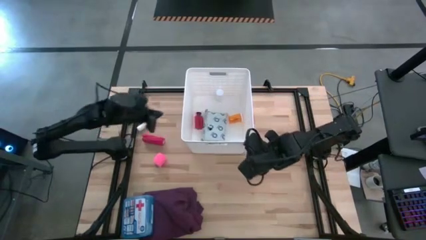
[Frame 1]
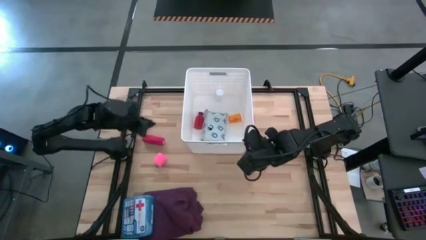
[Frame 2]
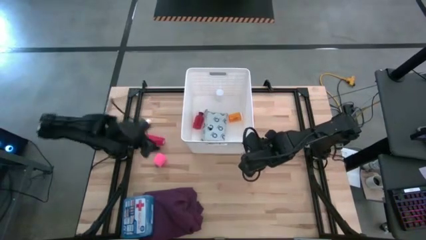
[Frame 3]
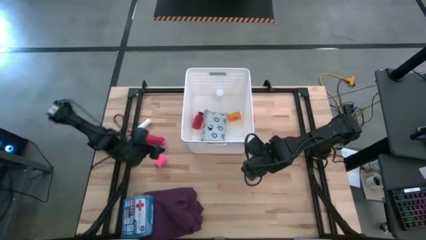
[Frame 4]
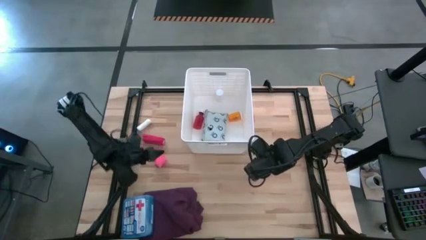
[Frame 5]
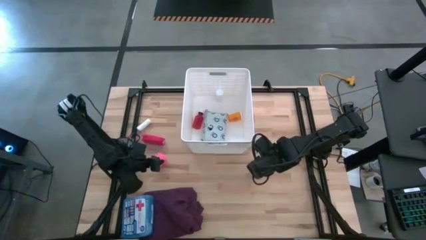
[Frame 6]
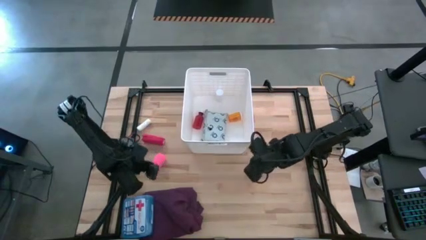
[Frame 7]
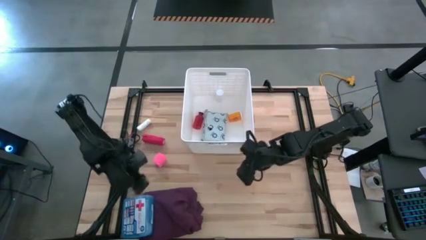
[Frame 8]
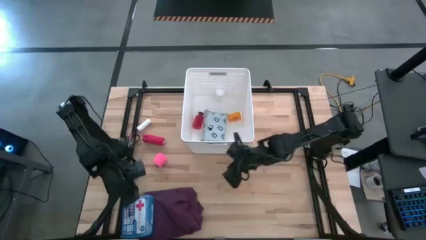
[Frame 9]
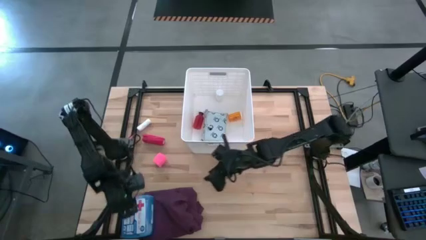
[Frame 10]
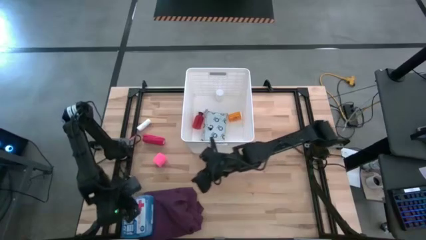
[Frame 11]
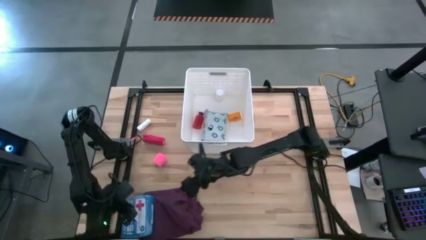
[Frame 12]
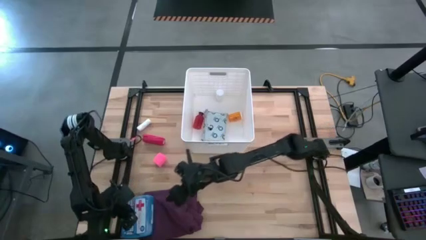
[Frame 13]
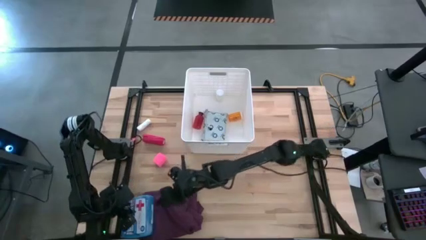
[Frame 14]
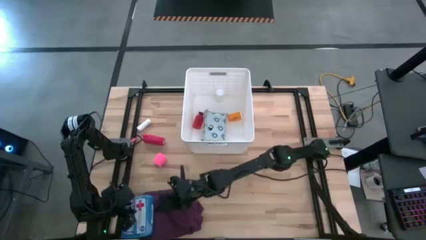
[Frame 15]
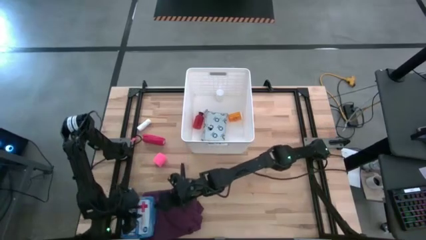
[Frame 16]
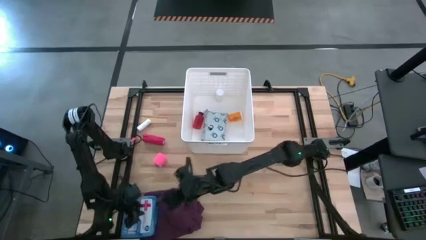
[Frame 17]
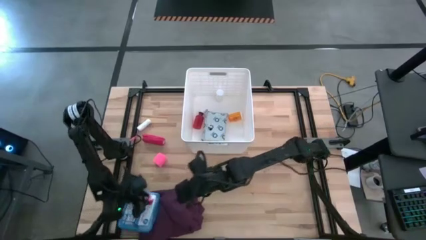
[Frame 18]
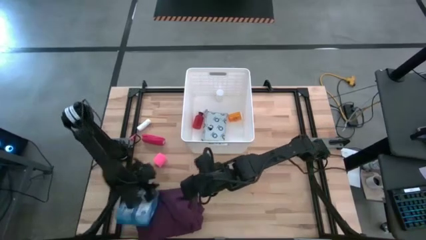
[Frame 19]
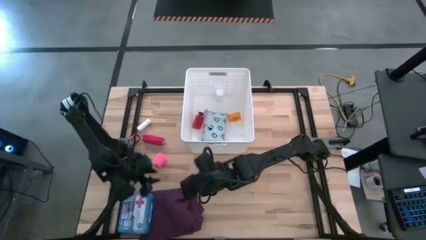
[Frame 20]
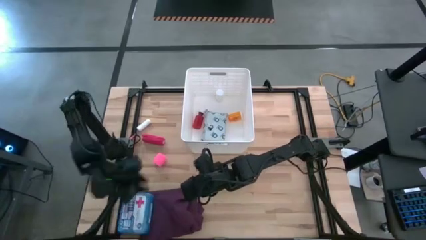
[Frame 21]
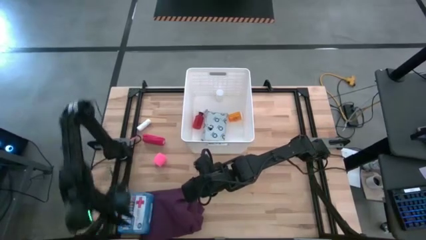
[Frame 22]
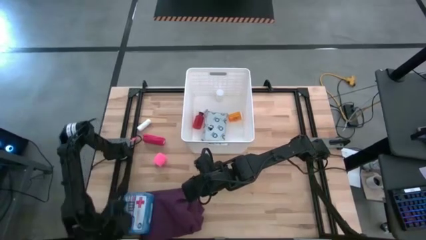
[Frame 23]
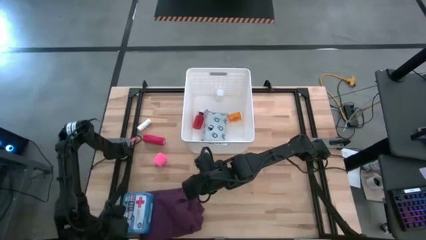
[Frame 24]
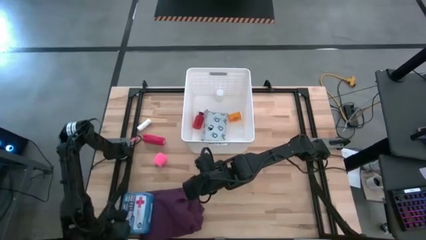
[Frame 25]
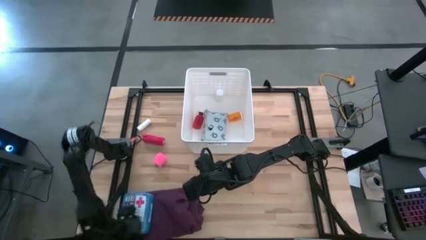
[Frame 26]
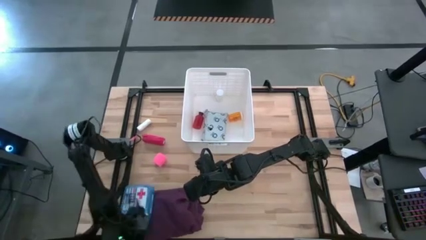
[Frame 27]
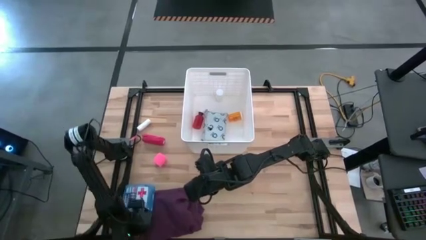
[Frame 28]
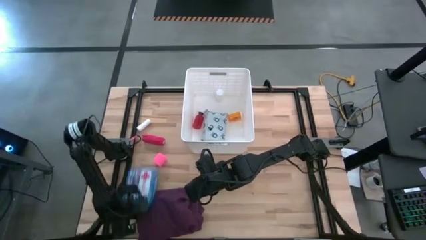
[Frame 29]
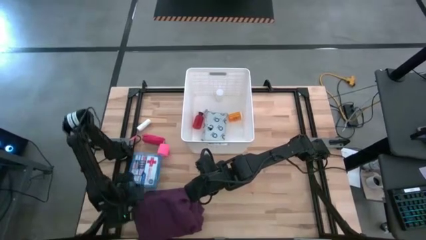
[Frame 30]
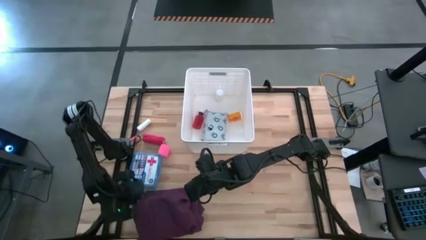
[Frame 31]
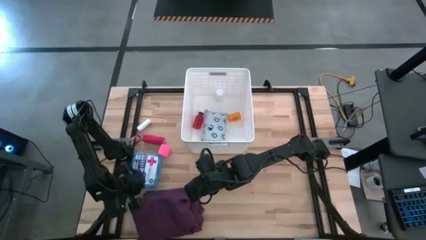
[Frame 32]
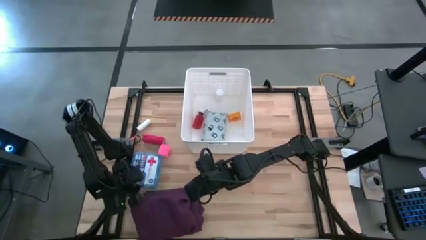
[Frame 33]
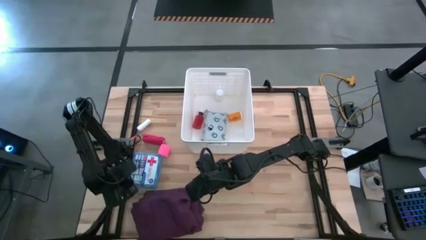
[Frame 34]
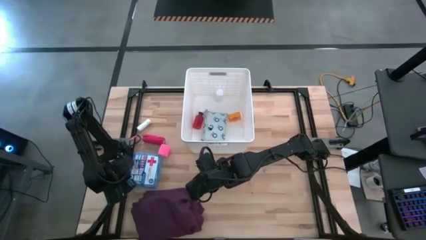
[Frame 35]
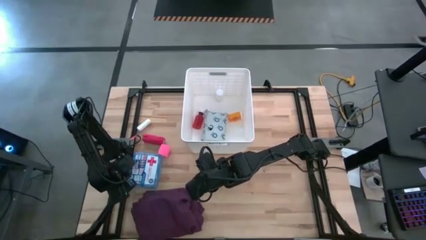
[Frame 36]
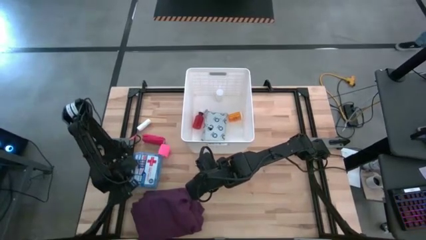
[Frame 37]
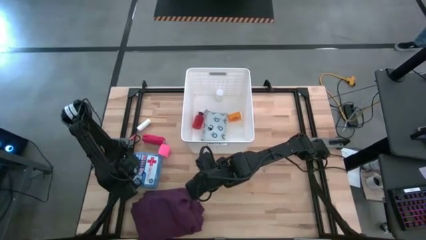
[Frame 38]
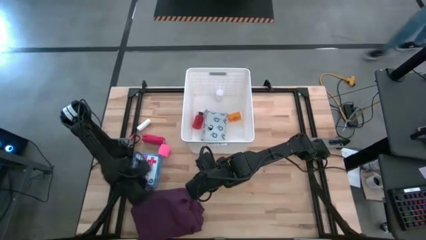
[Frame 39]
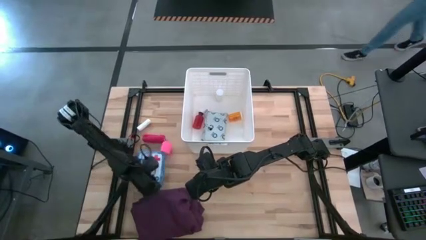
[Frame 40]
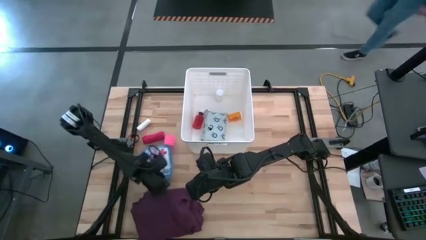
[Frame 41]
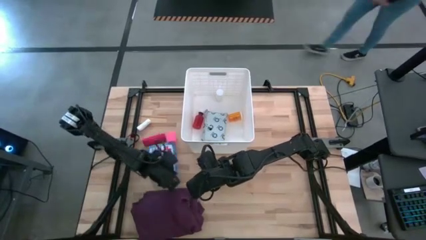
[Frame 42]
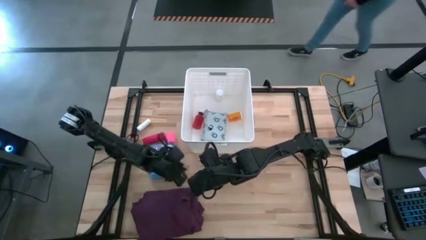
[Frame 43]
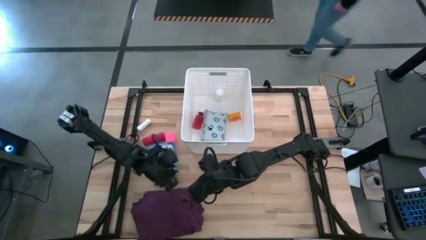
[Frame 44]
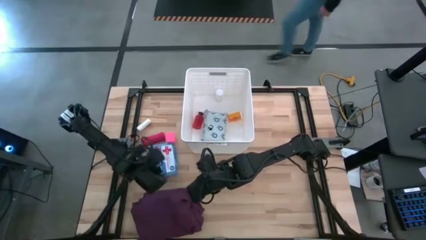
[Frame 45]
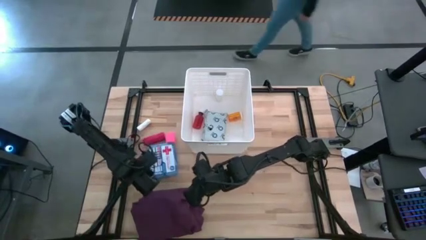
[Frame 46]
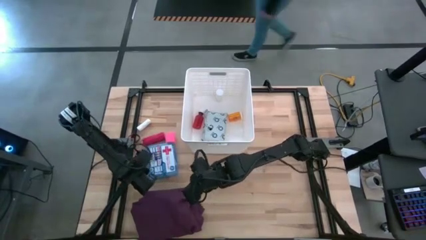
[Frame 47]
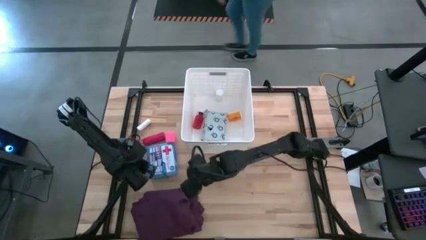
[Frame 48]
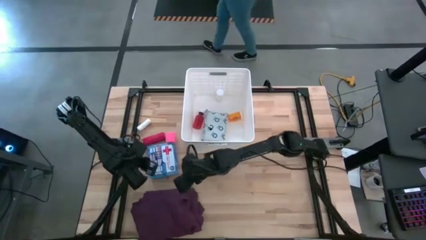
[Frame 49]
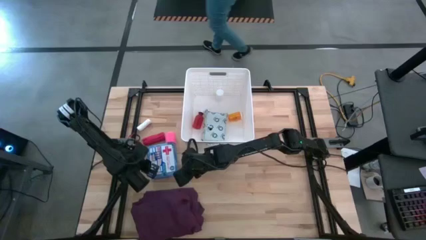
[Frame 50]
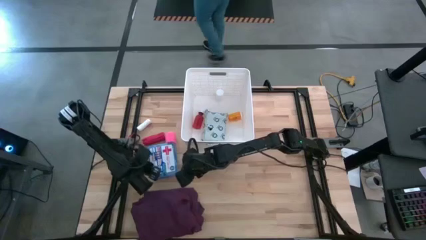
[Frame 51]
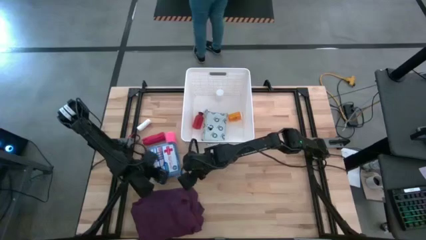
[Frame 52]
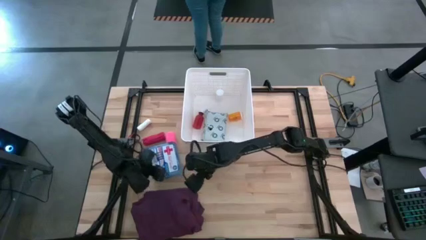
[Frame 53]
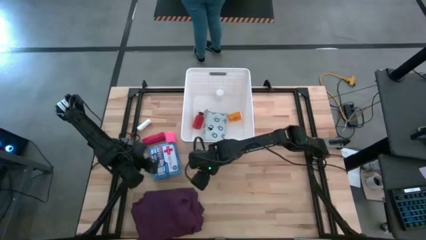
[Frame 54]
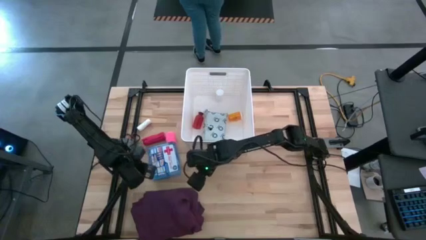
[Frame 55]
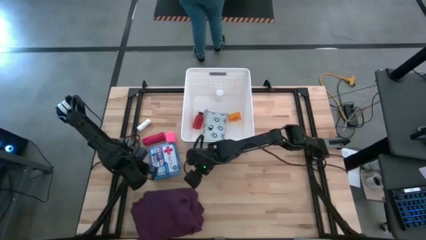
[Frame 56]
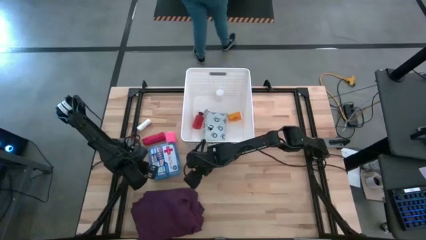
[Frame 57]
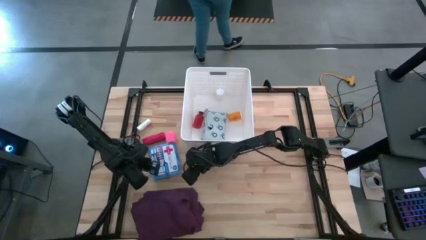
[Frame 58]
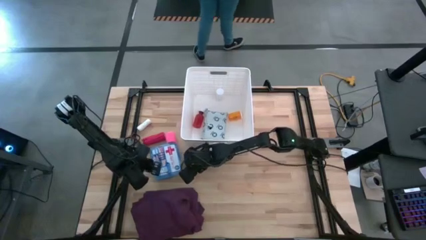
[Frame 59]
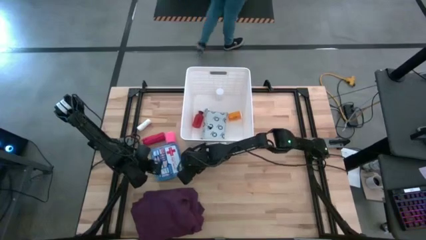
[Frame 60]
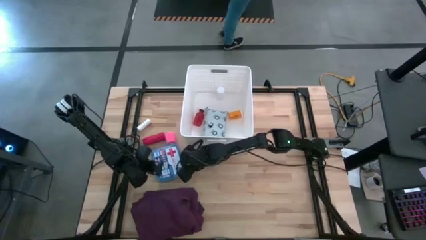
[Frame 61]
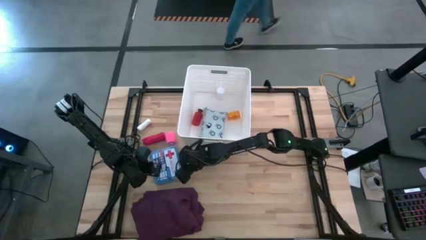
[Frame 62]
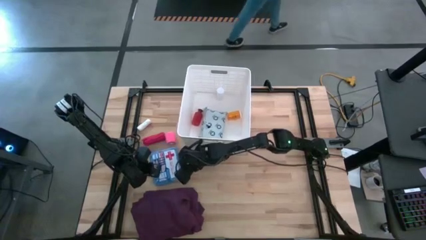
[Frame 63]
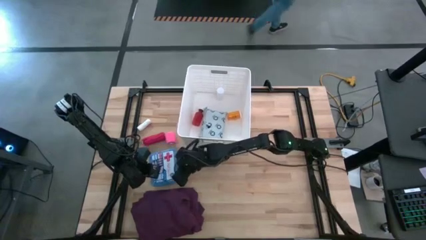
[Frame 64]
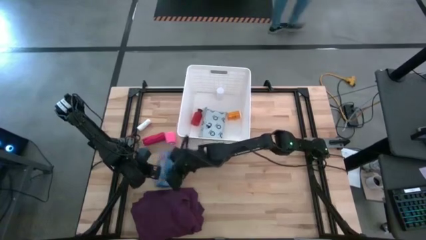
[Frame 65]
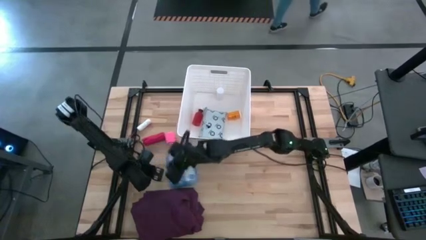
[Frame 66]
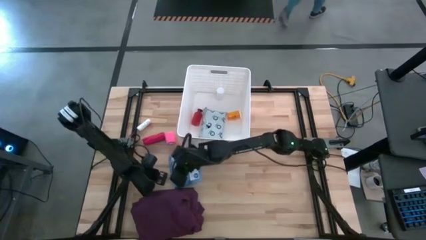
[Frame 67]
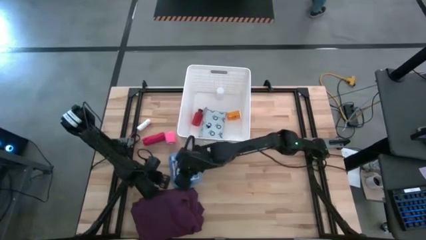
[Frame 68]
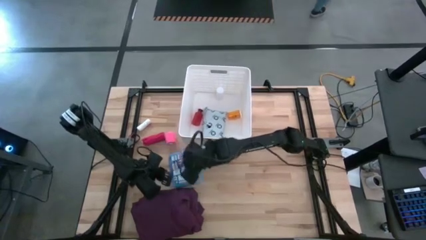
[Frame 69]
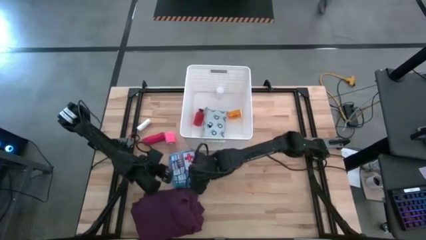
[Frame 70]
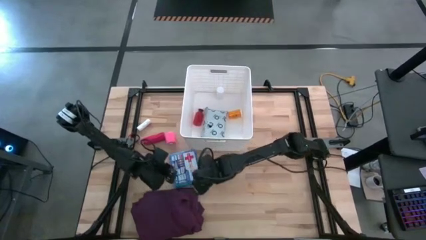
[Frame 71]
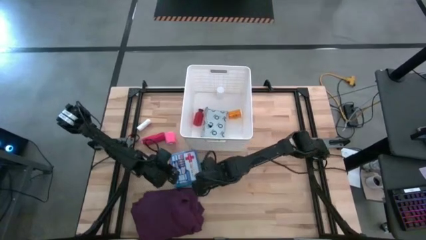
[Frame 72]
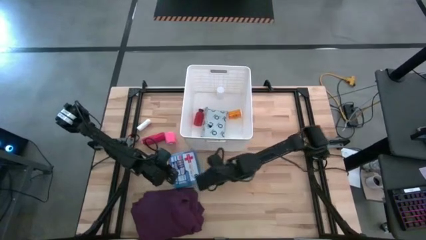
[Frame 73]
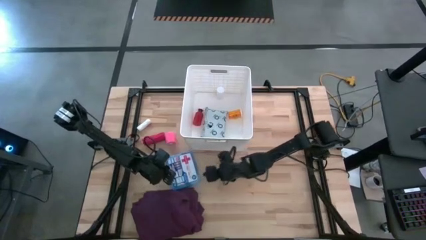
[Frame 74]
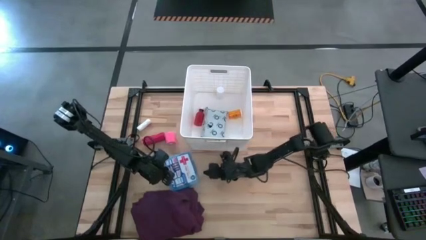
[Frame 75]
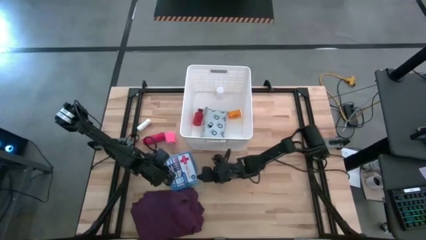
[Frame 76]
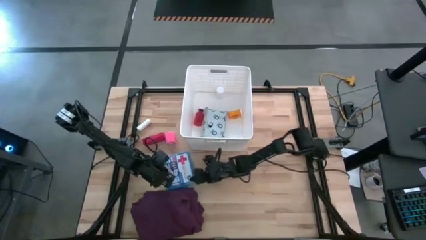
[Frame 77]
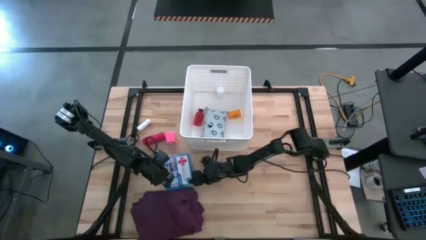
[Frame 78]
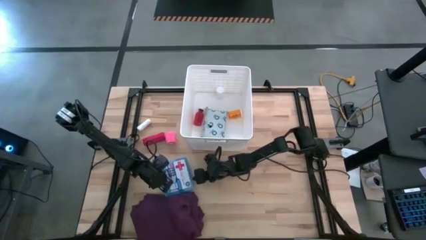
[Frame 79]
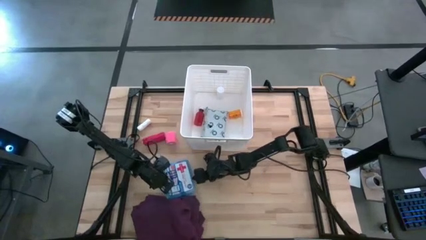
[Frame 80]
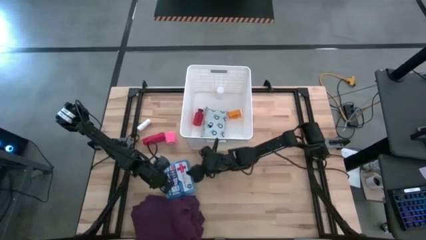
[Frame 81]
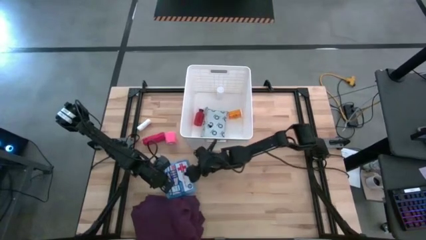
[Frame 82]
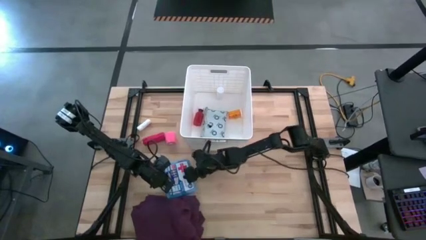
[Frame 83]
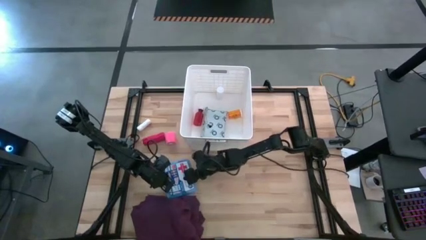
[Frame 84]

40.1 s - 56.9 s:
Task: Pick & place medical supplies in basket/bin
Put the blue first aid kit into the white bin
